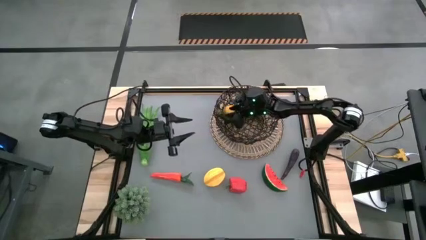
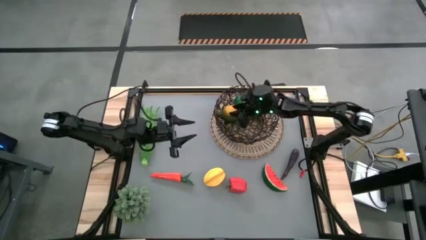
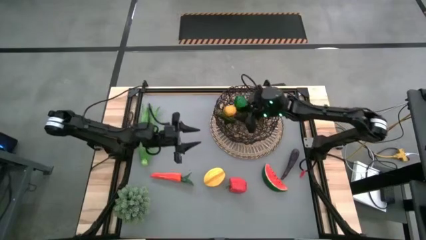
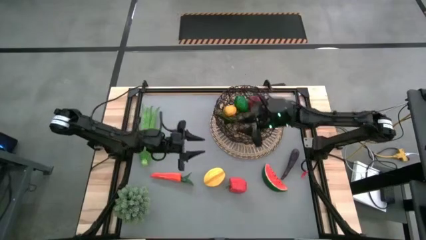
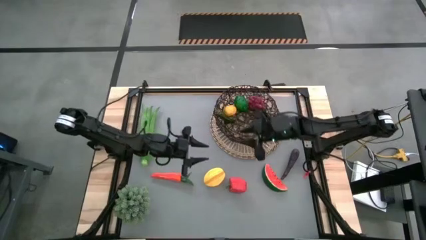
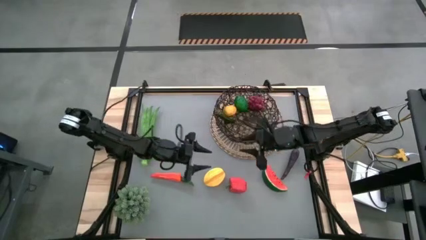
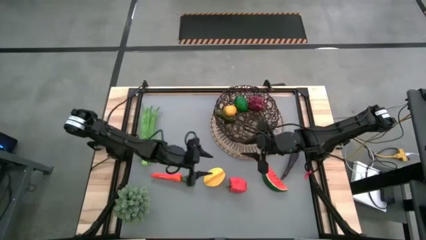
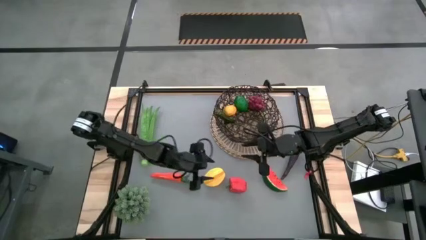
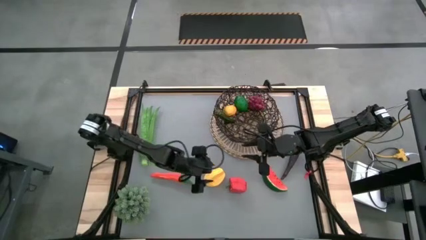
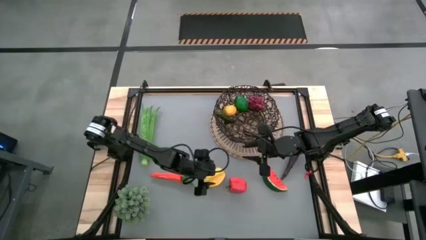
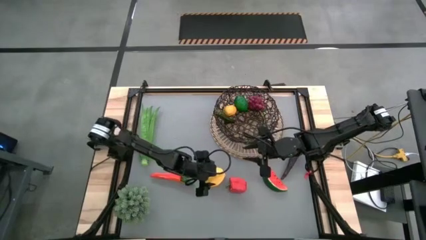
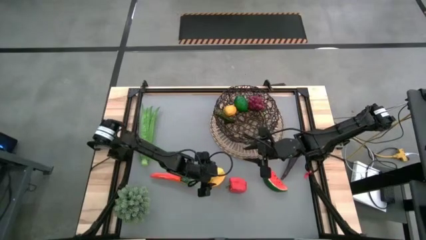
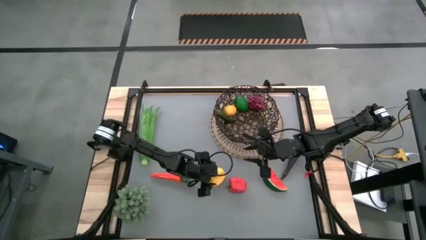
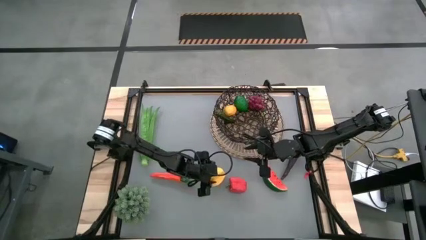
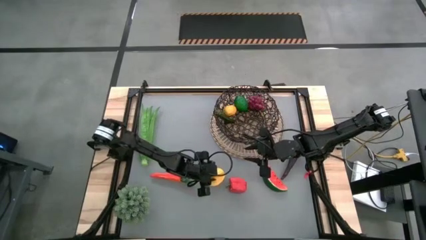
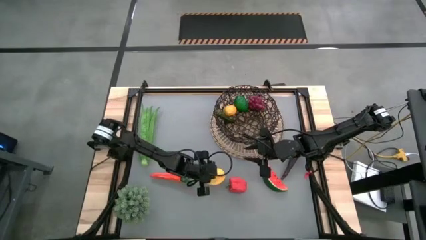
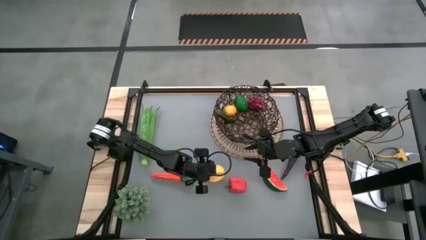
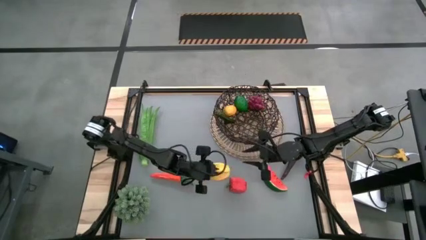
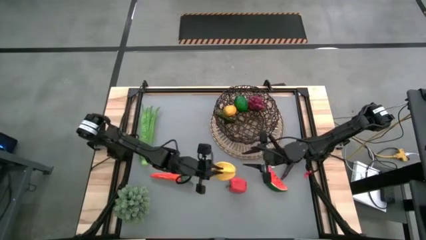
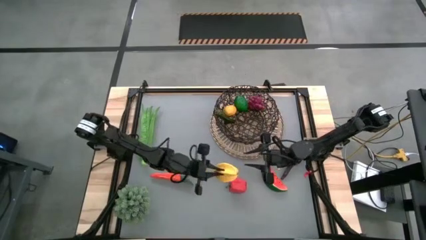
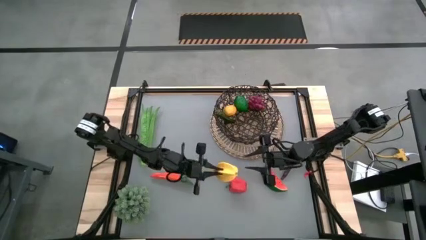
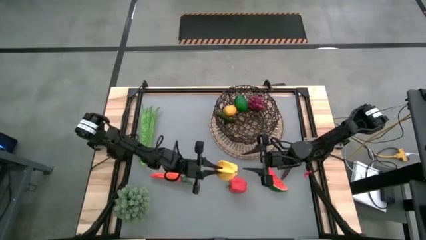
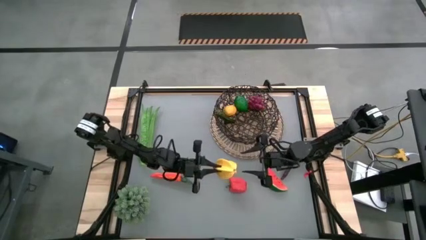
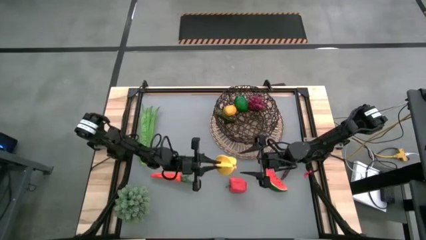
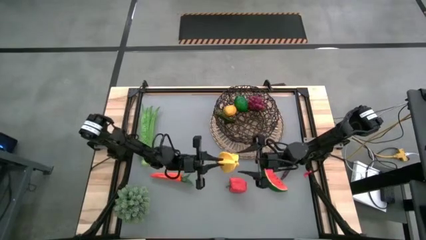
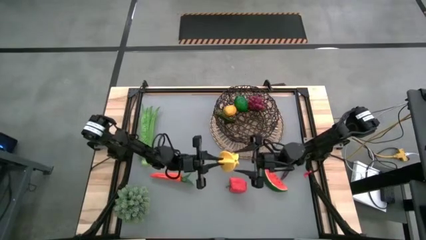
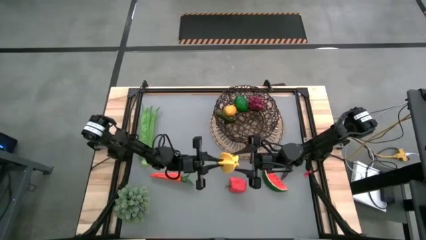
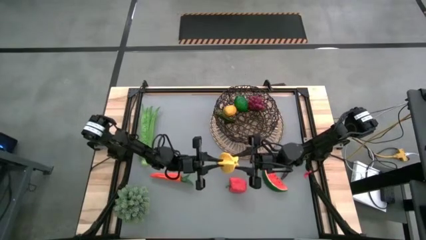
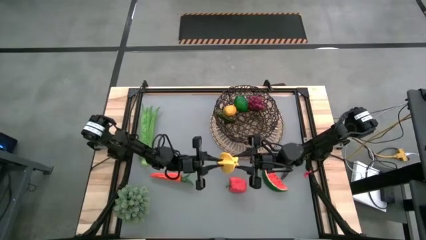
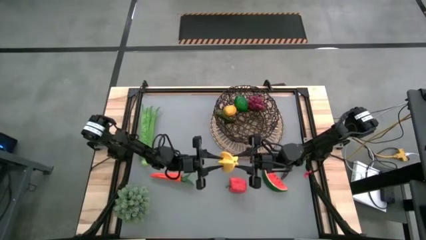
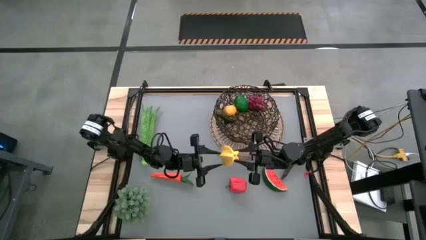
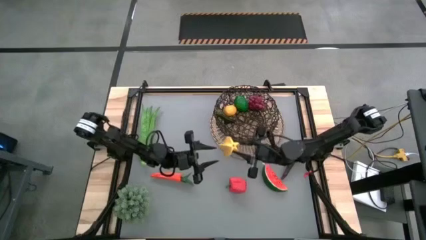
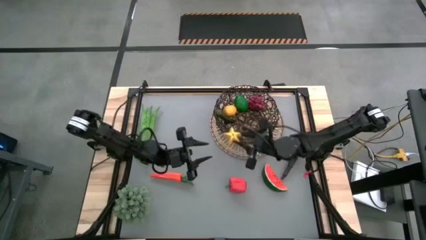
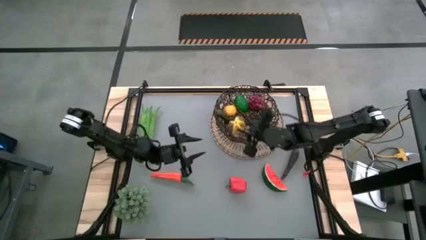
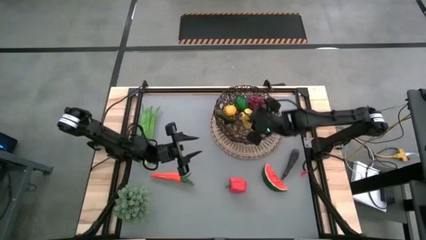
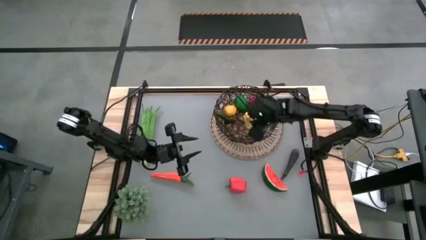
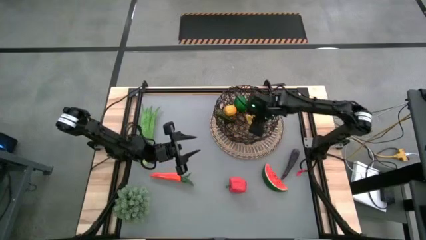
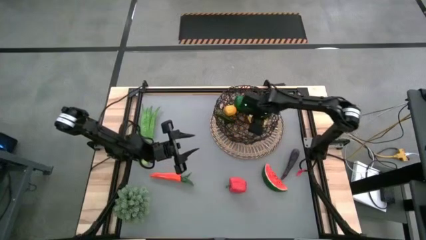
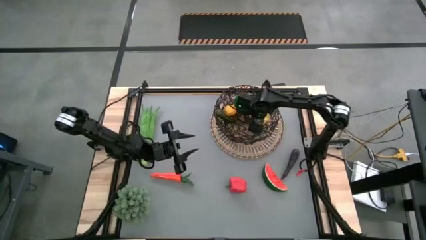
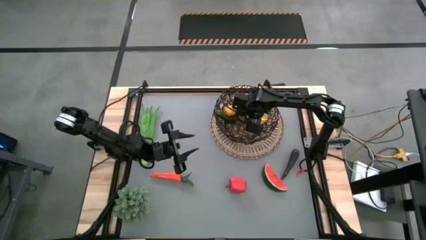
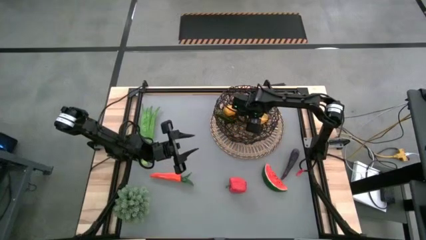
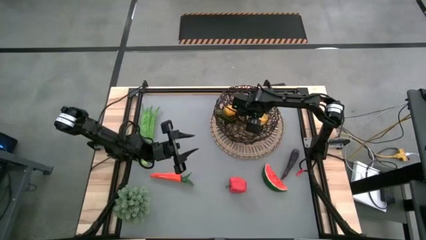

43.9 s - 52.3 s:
Task: Build produce basket
Put the yellow star fruit into the basket

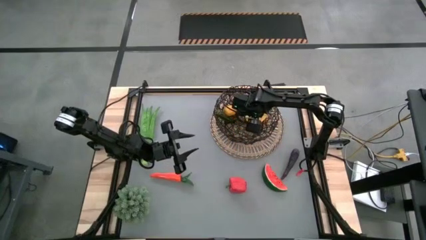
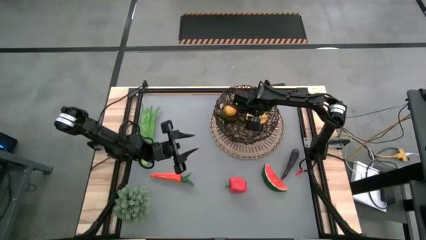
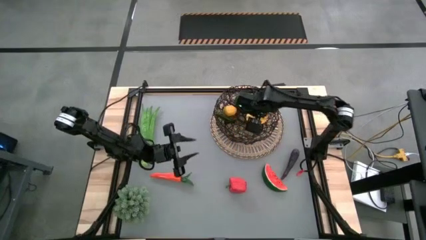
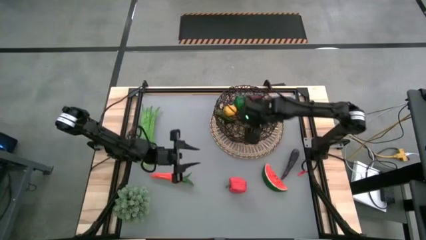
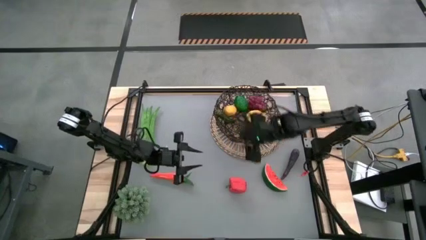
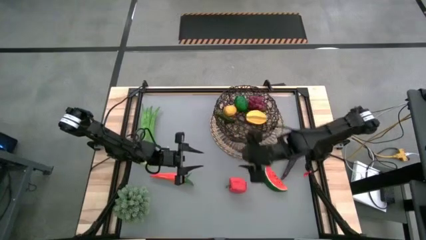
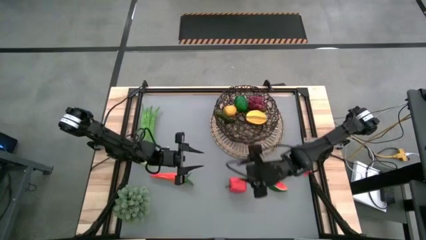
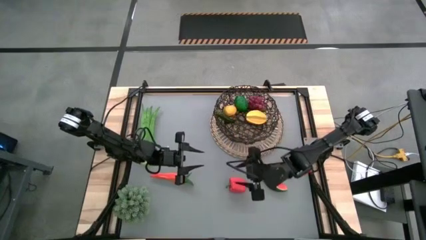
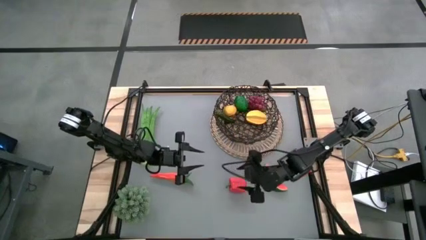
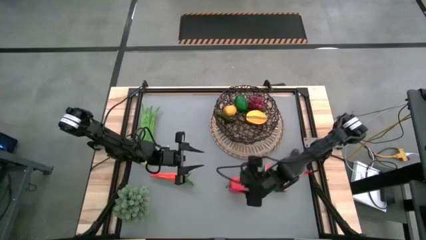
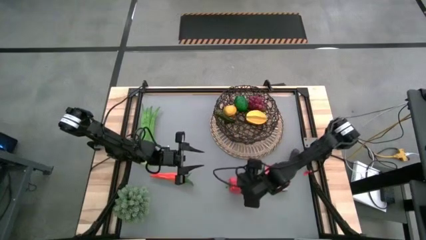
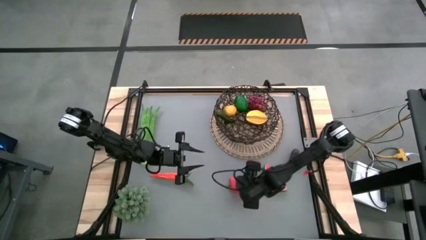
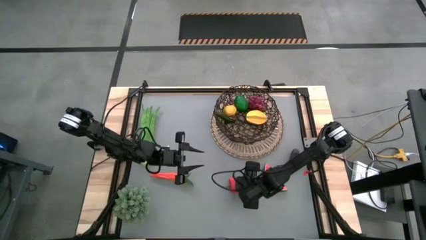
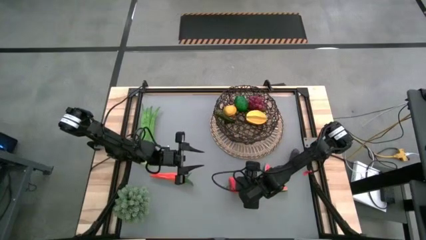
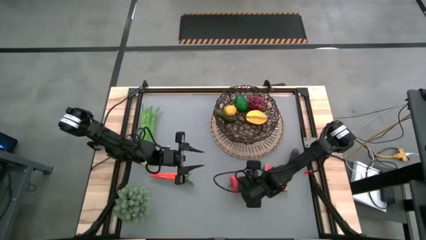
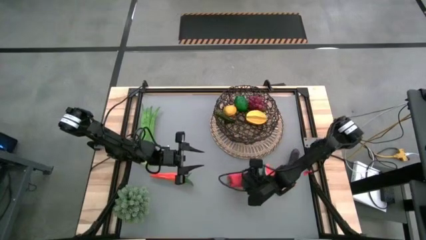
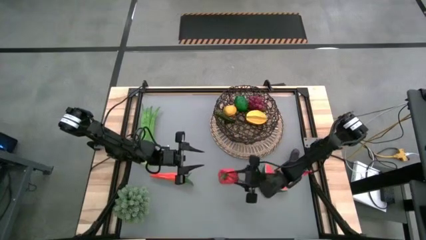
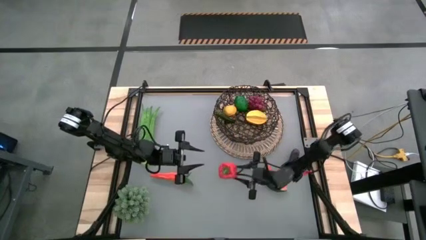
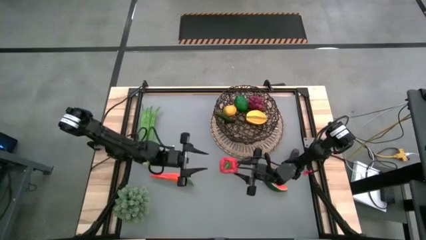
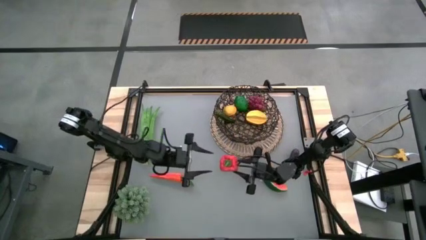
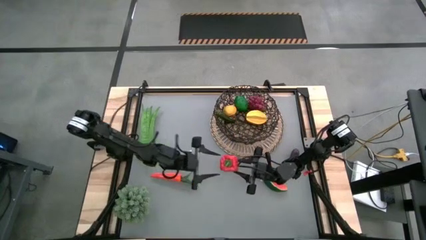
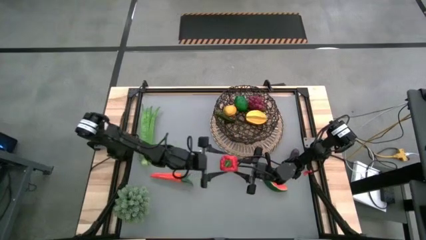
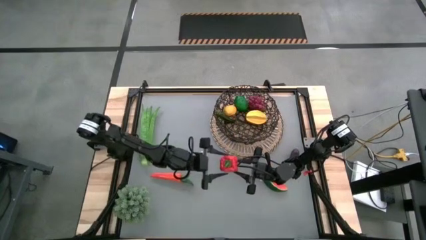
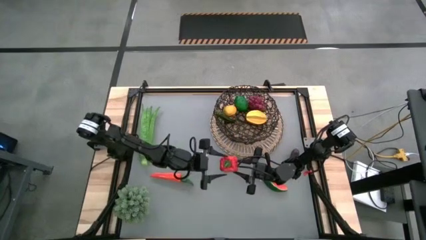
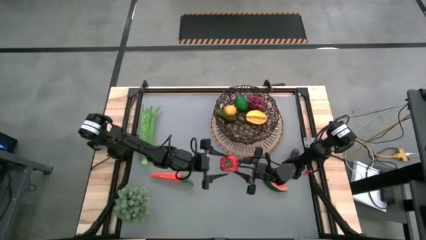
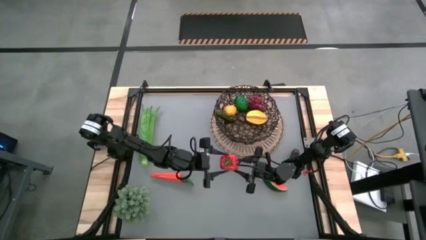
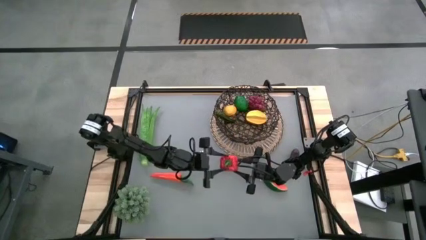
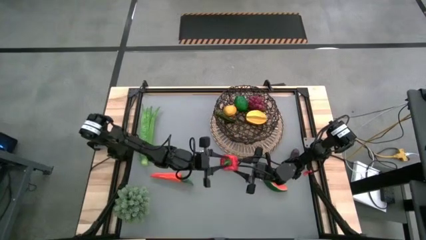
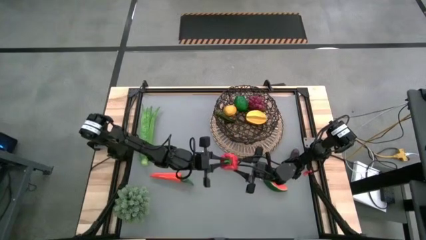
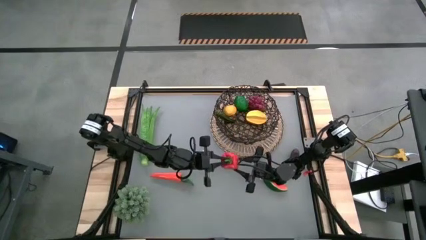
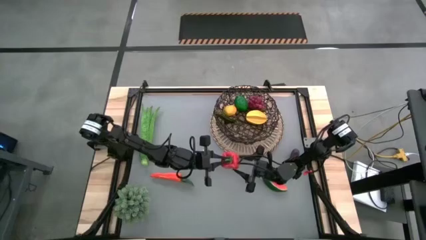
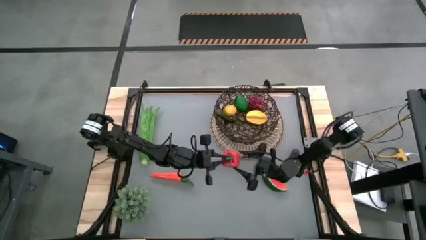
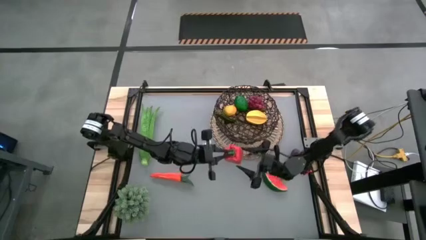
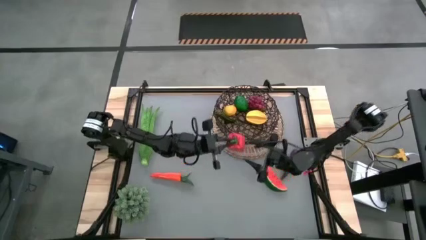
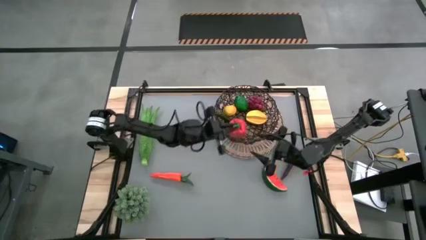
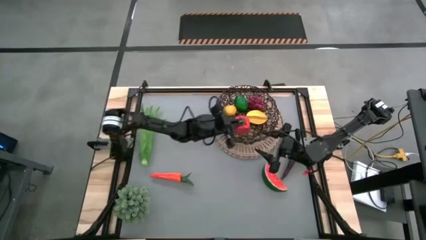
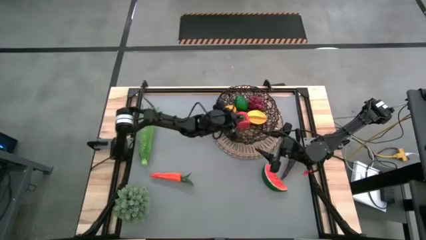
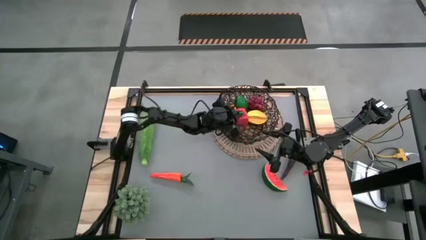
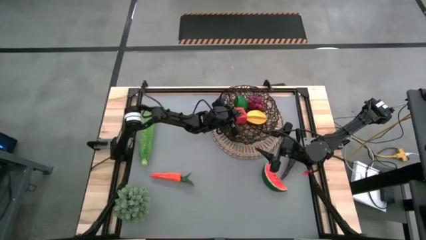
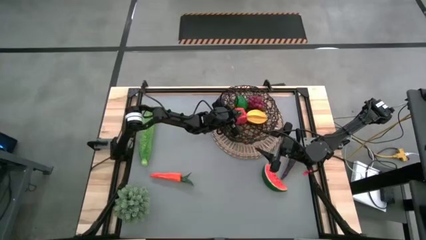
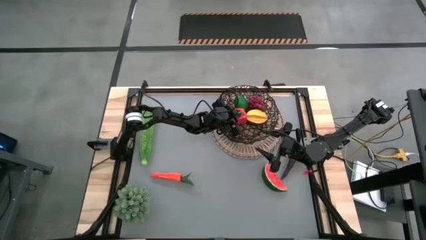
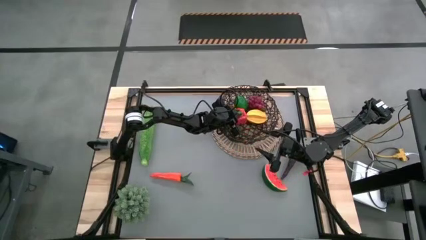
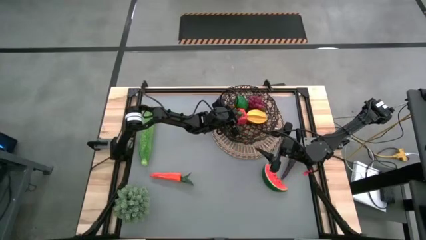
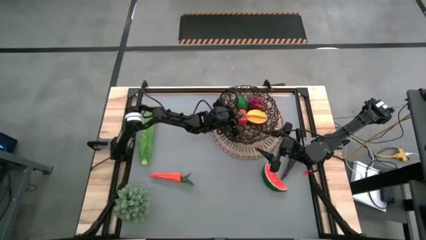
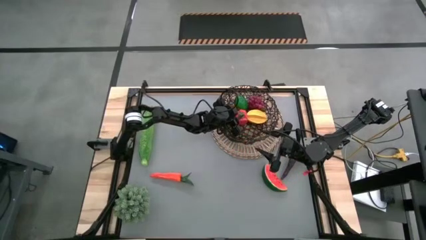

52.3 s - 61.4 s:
Put the red bell pepper into the basket
